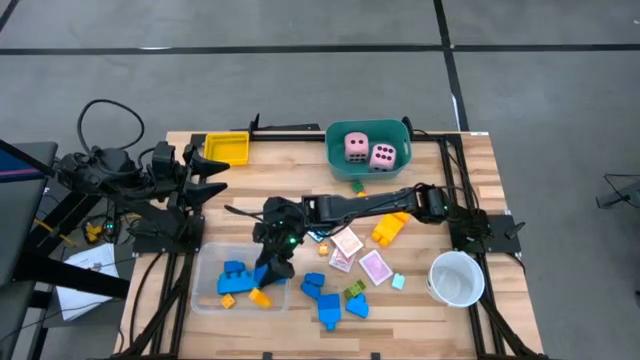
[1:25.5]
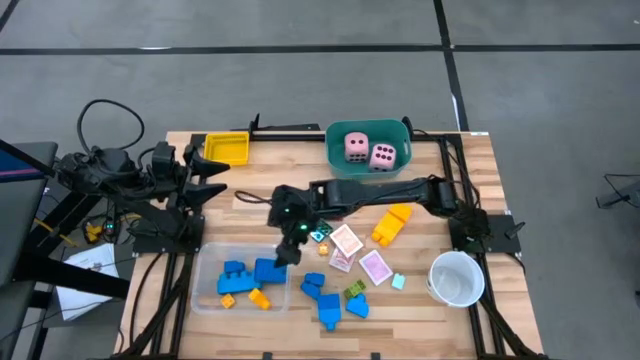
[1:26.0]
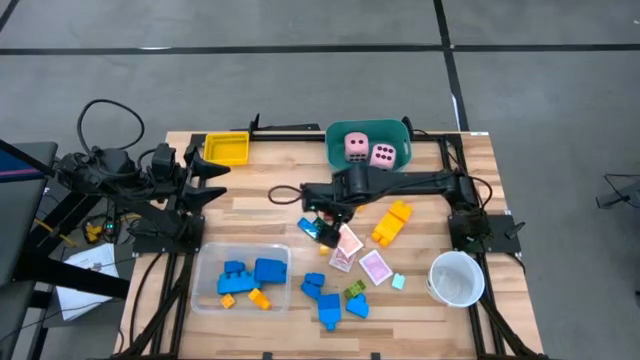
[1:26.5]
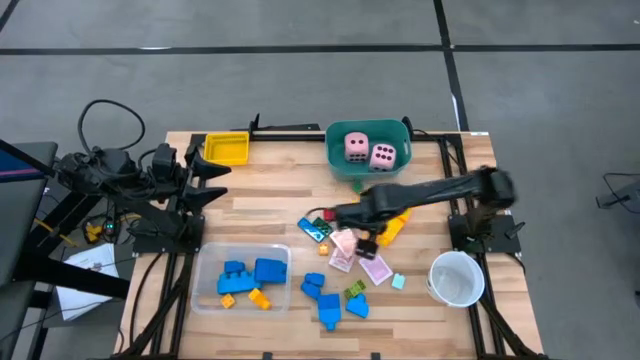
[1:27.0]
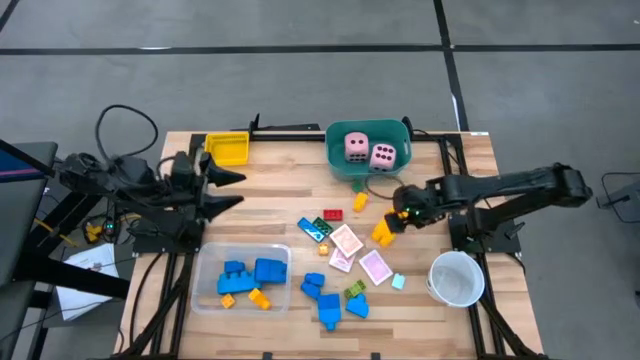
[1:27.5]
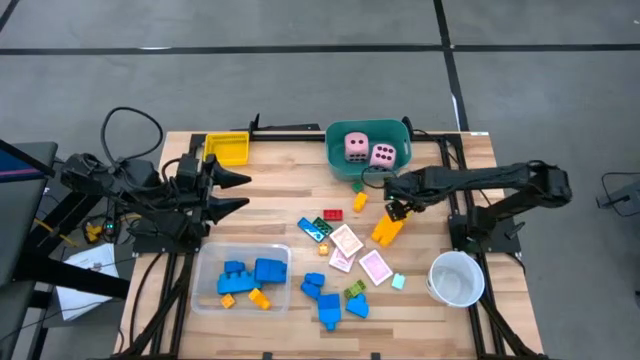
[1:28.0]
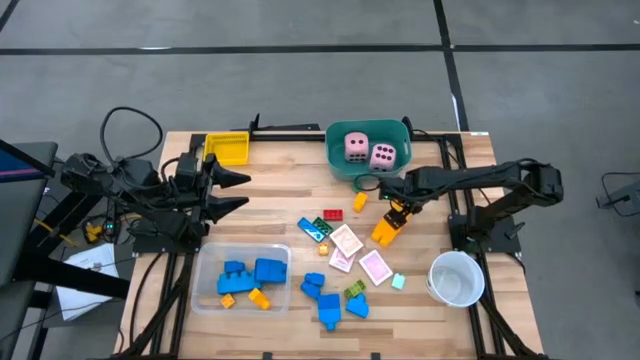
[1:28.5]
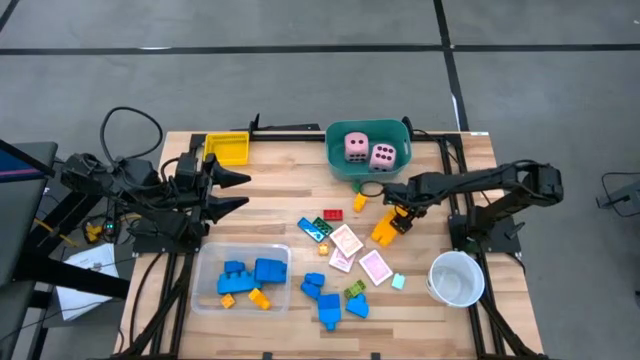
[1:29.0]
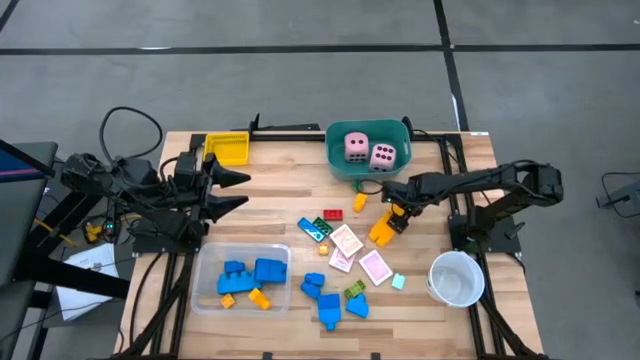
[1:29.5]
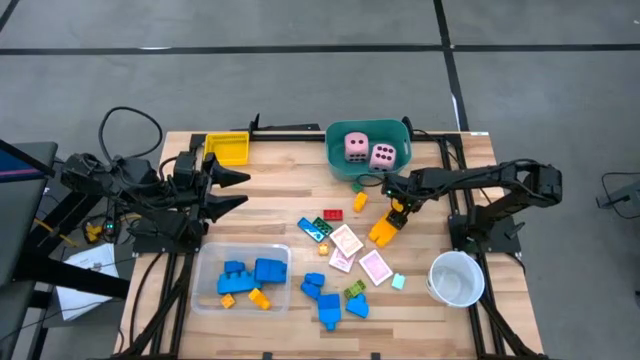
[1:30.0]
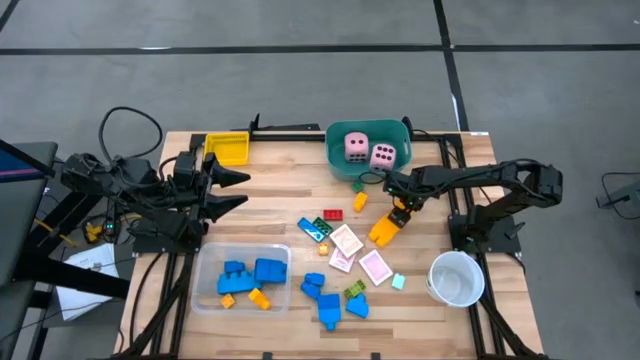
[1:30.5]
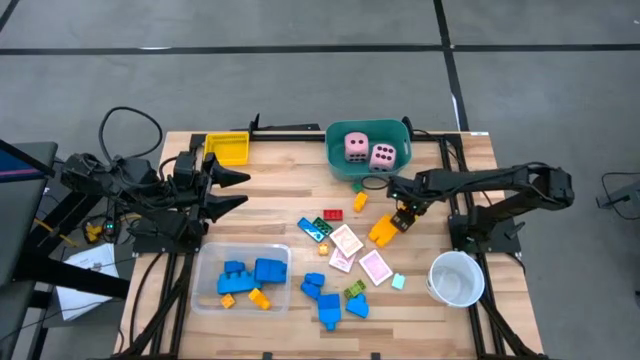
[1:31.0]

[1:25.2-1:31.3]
Task: Pick & Place Toys
Put the yellow game piece into the transparent bin

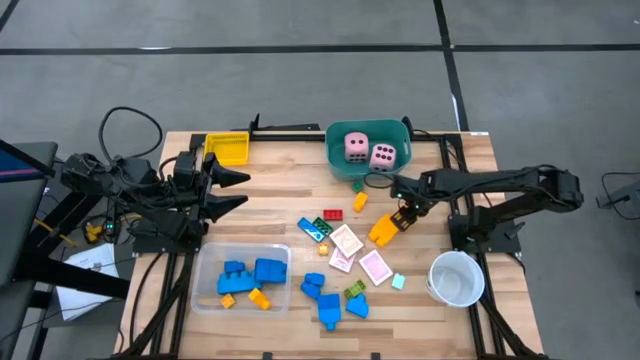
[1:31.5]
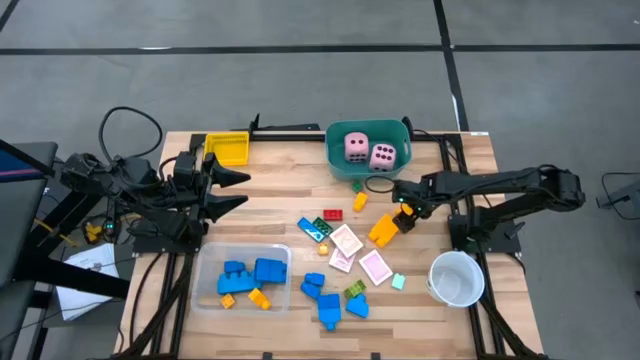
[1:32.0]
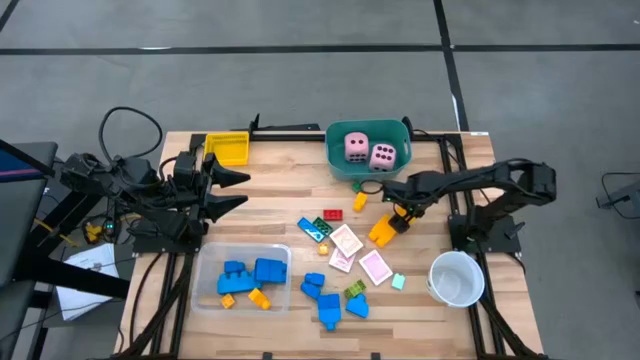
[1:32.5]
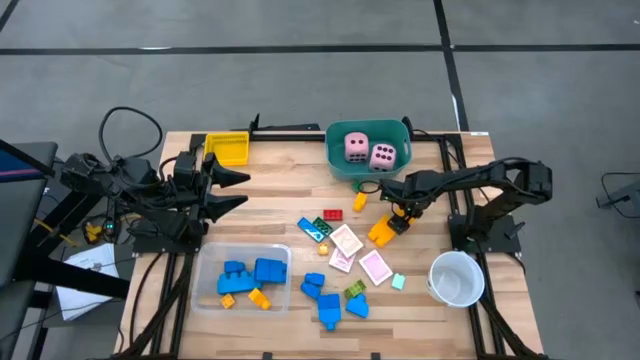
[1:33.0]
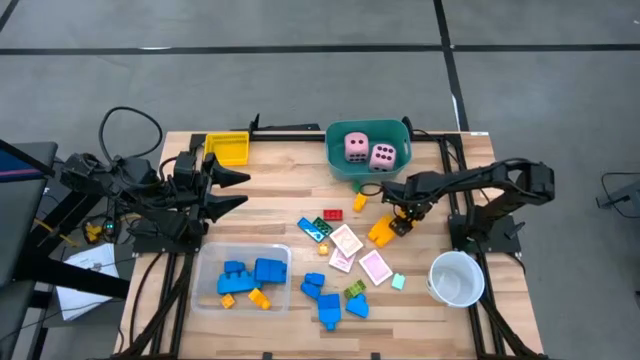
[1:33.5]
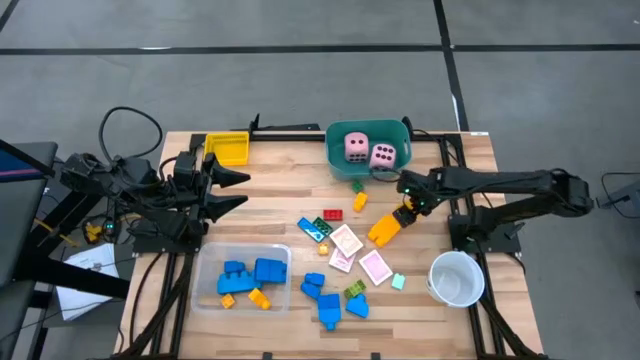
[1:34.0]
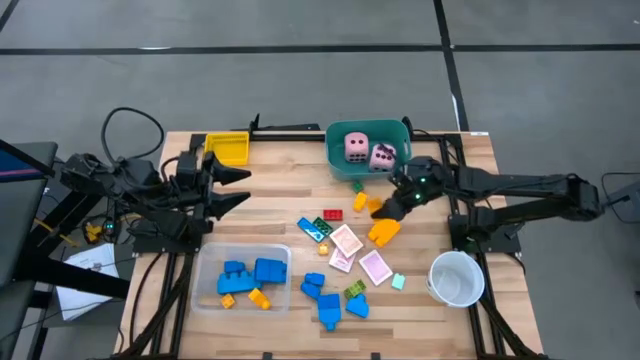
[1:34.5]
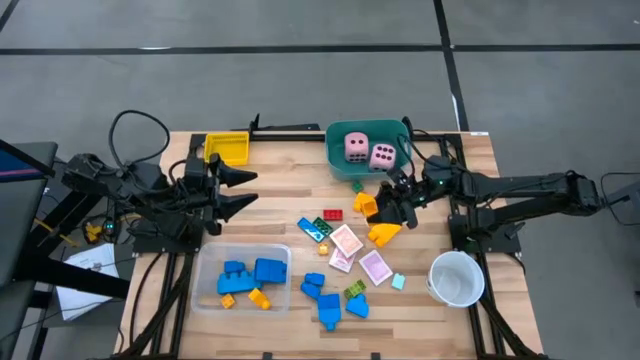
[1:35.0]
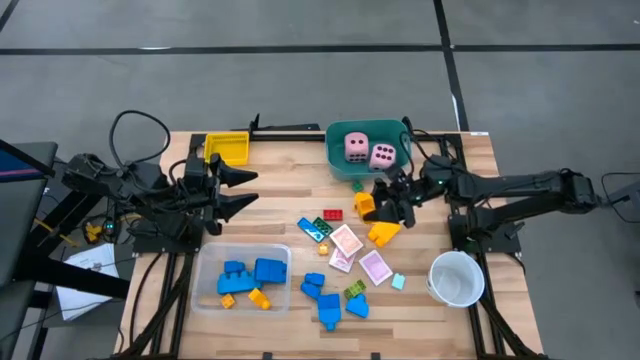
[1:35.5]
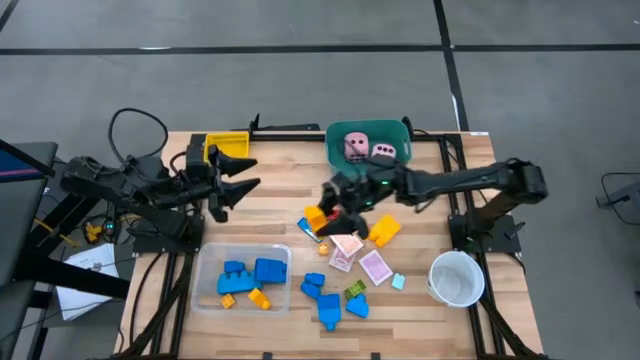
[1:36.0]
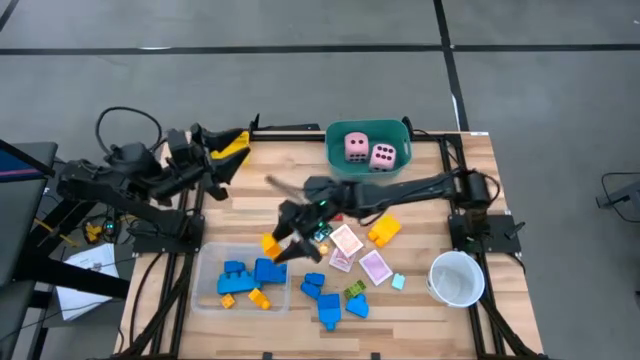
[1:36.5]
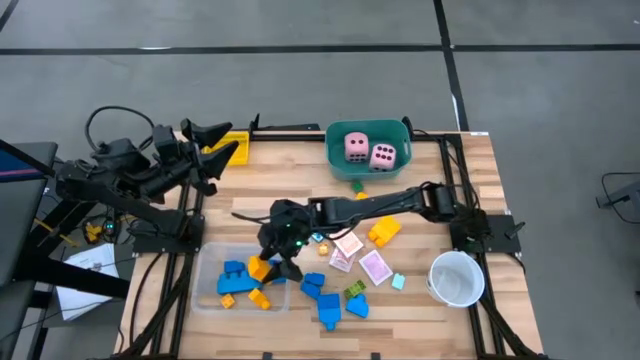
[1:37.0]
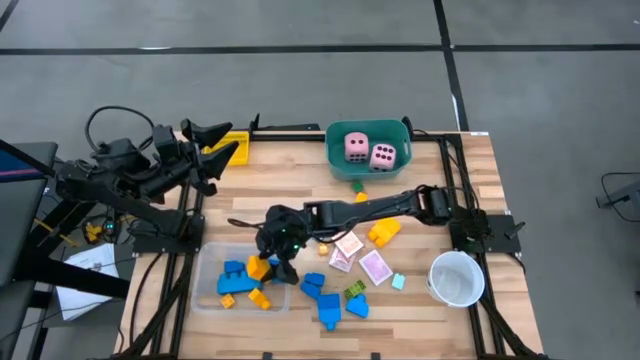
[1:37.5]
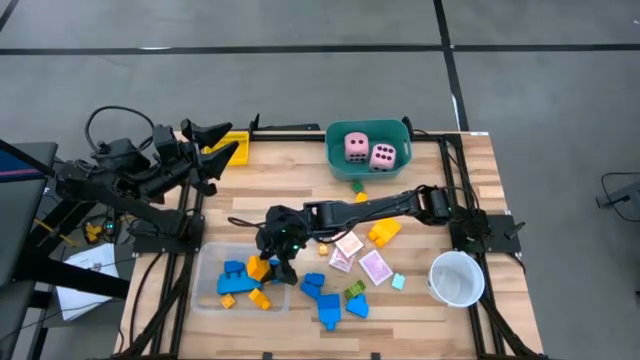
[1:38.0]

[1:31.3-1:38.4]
Put the yellow game piece into the transparent bin

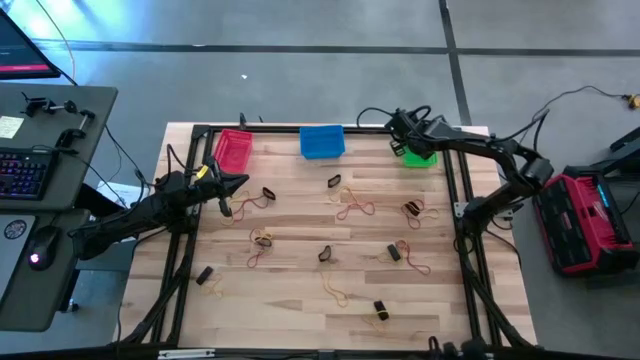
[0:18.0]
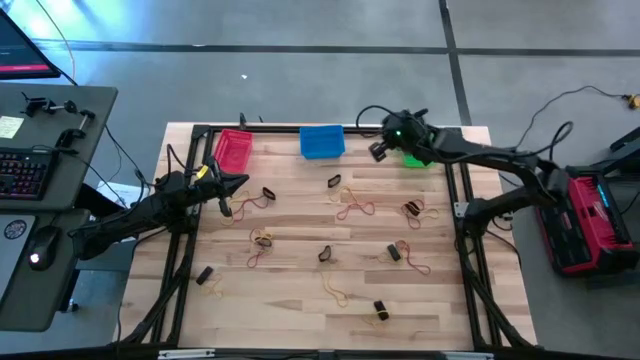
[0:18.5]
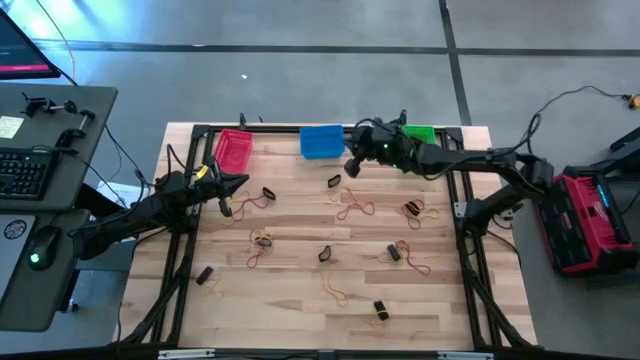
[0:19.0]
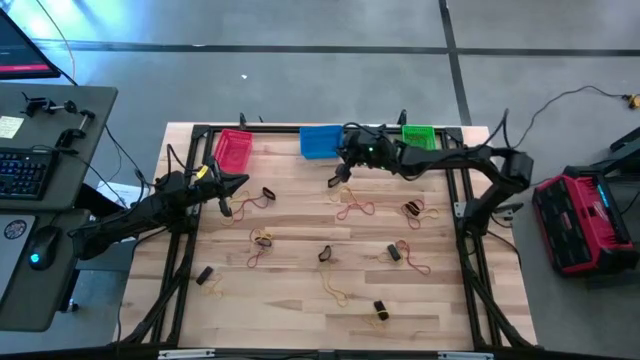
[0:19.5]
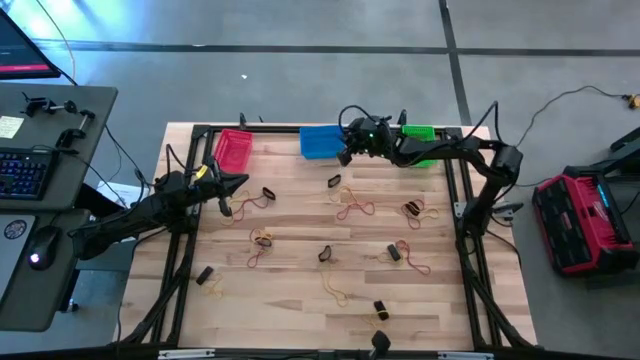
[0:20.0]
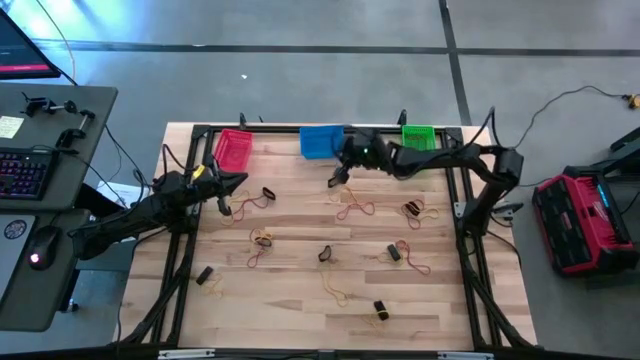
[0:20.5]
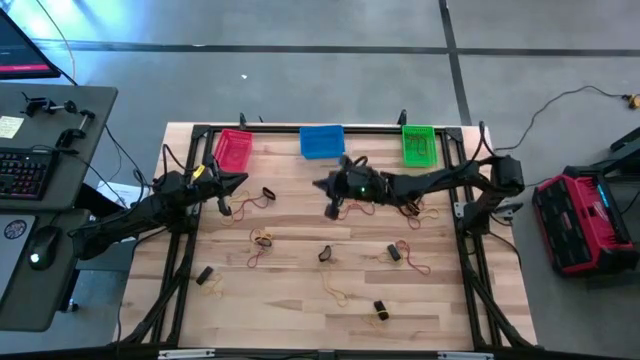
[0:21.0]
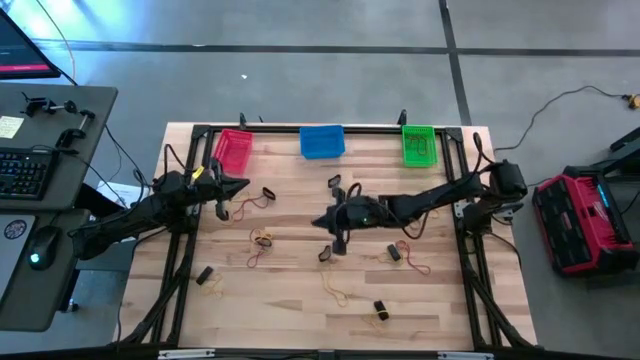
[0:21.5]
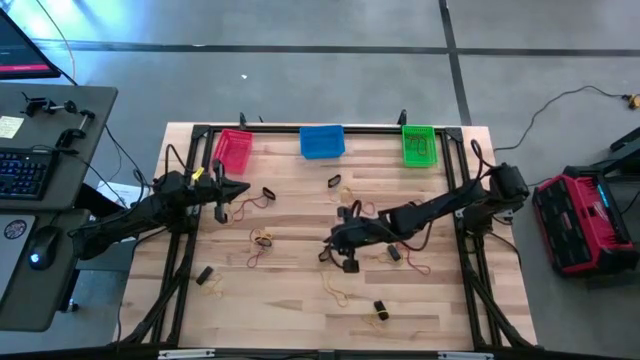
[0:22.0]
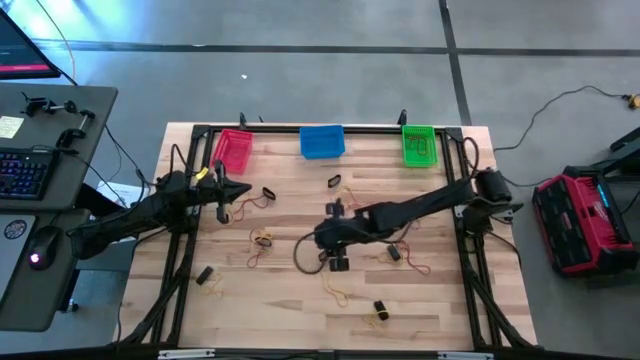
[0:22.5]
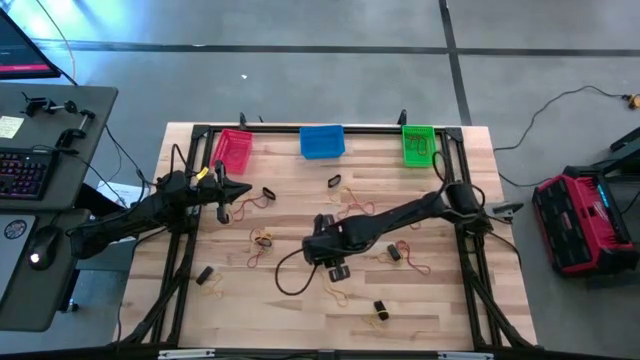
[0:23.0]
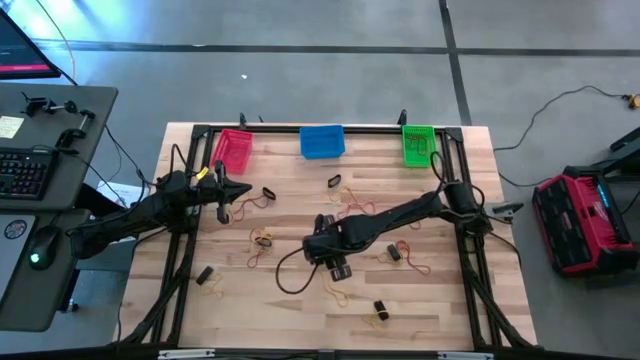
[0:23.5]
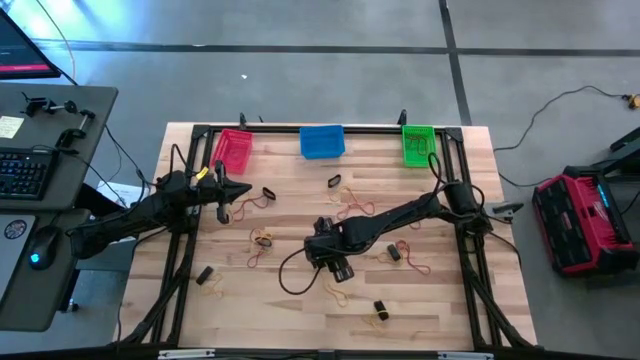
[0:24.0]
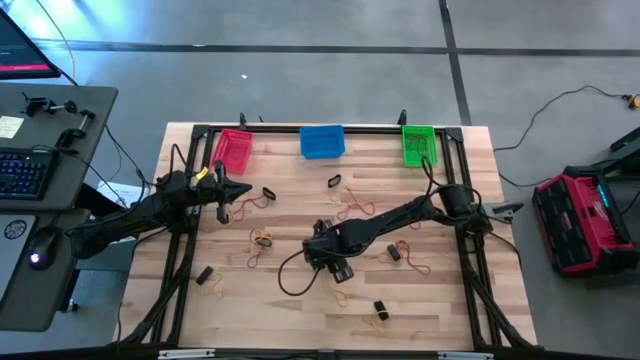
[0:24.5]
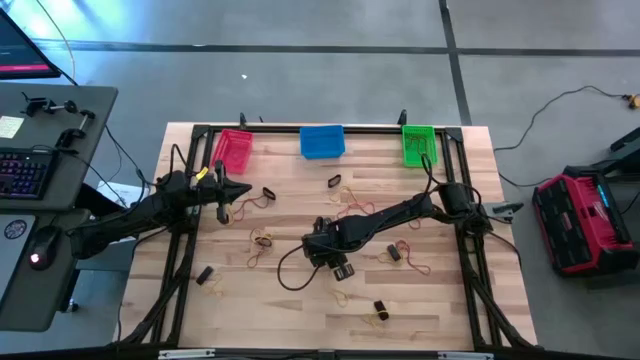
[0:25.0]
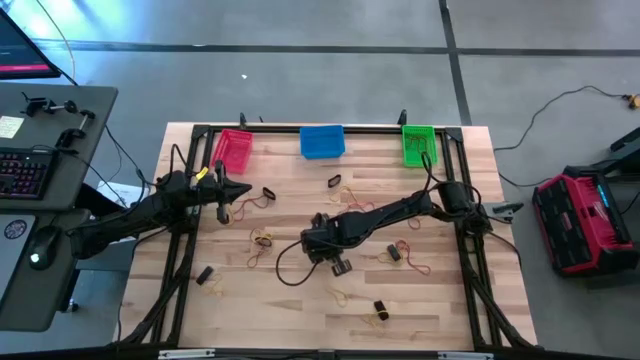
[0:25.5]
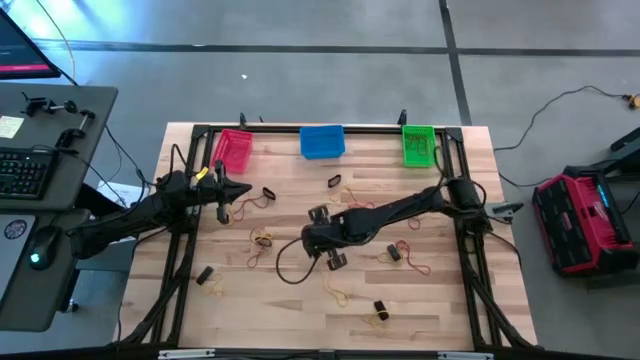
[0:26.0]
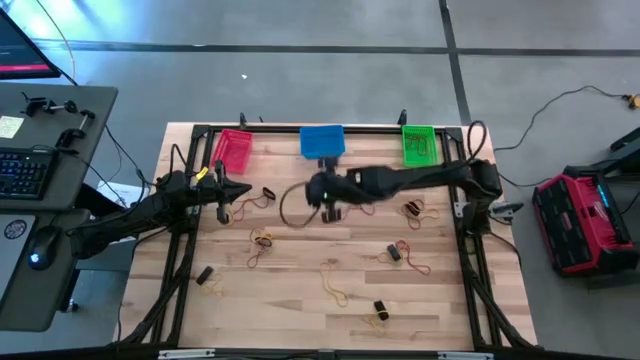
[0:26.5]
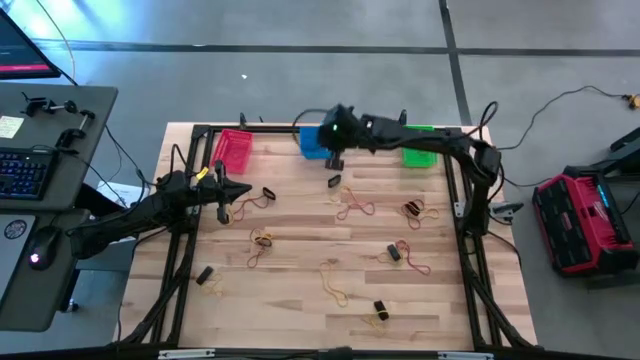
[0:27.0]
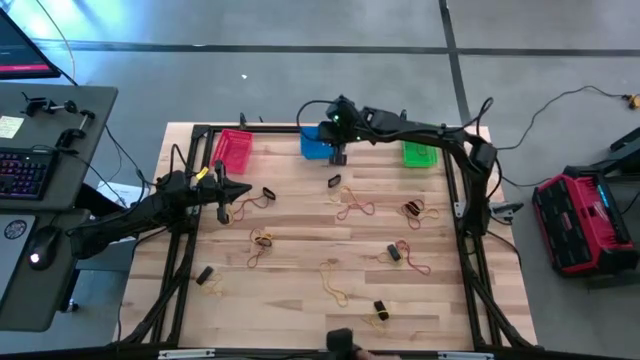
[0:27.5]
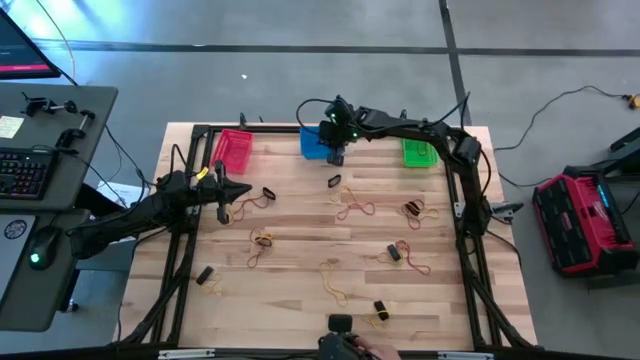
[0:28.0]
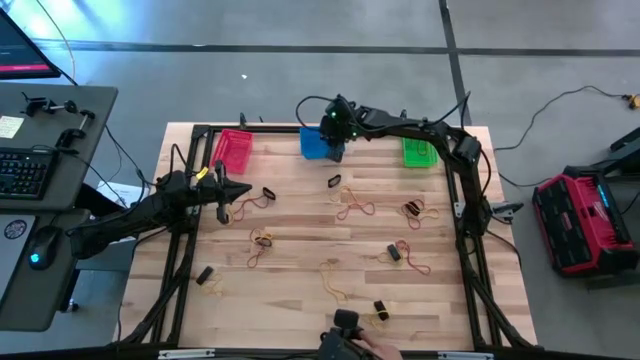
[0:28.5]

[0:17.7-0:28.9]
Task: Sort rubber bands into baskets
Put the black rubber band into the blue bin
